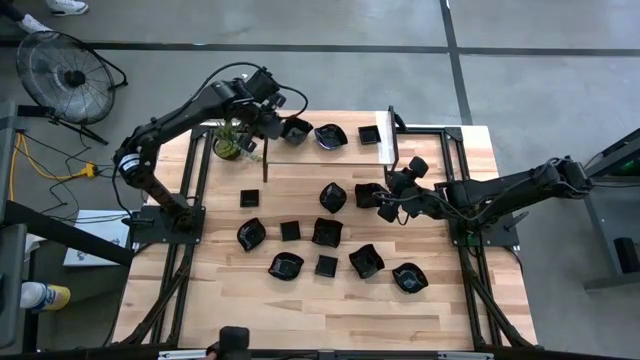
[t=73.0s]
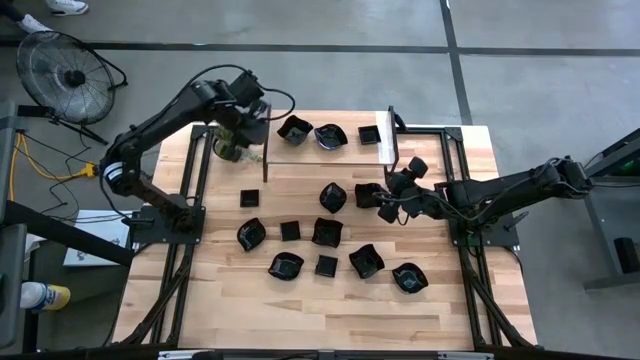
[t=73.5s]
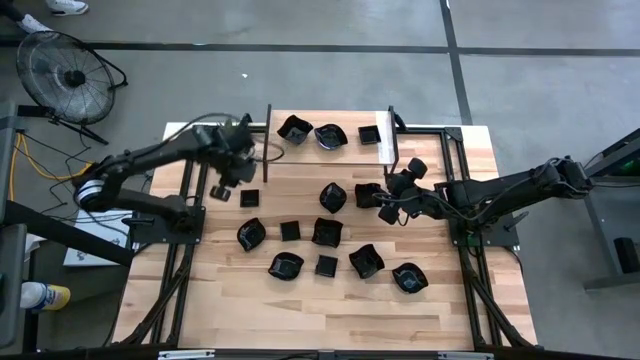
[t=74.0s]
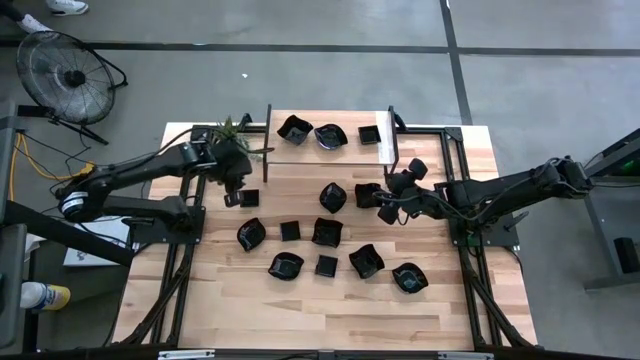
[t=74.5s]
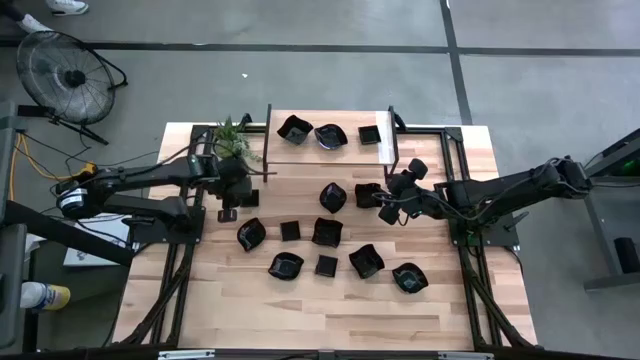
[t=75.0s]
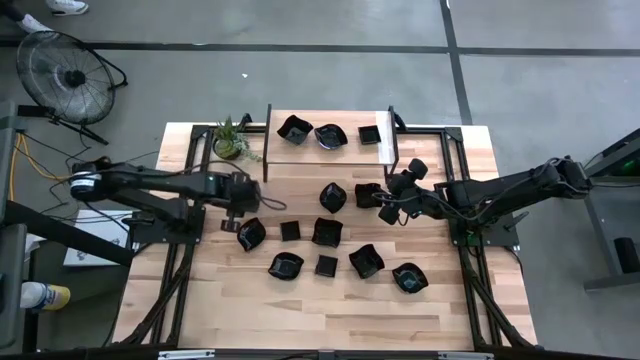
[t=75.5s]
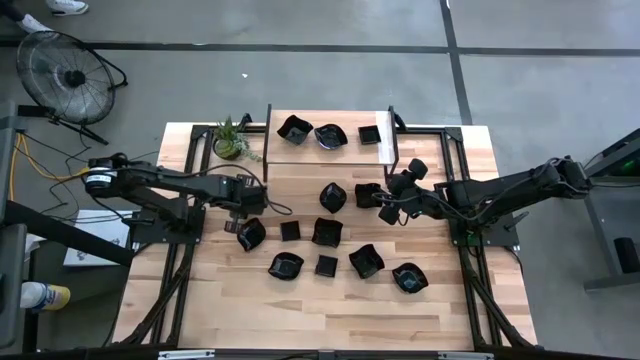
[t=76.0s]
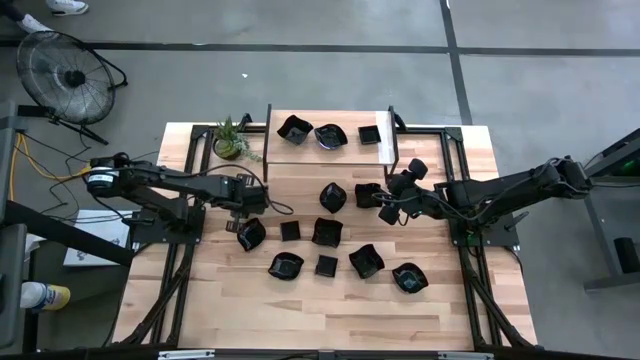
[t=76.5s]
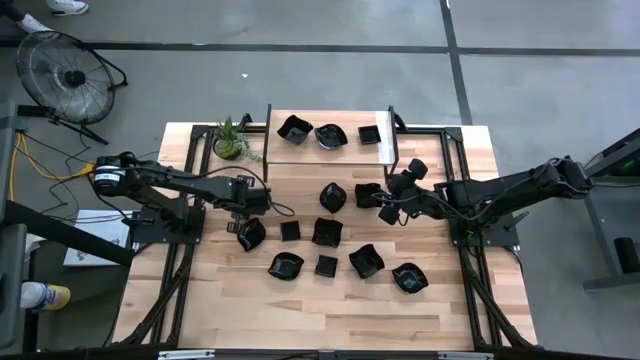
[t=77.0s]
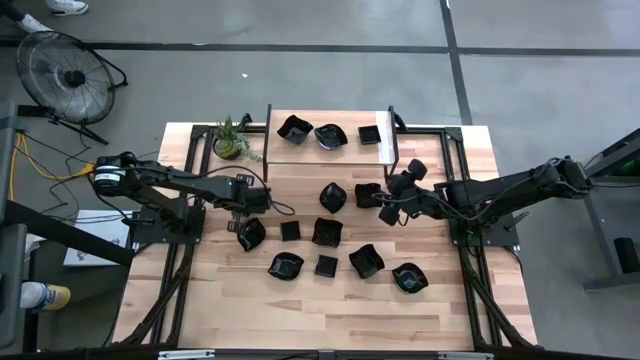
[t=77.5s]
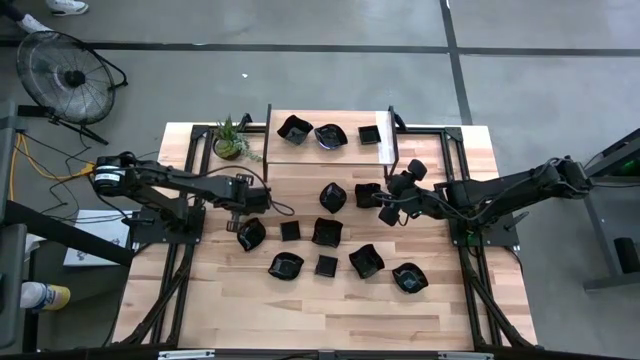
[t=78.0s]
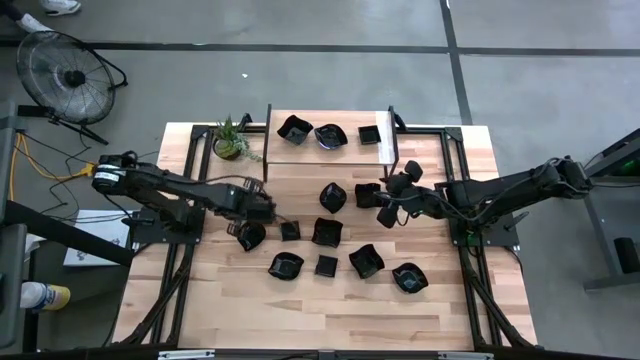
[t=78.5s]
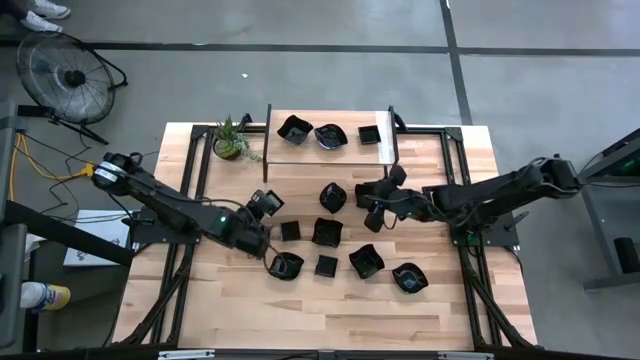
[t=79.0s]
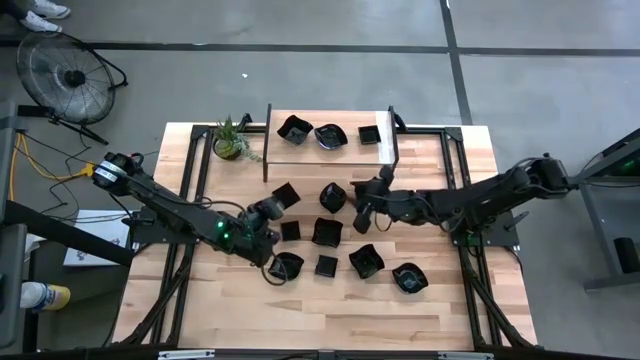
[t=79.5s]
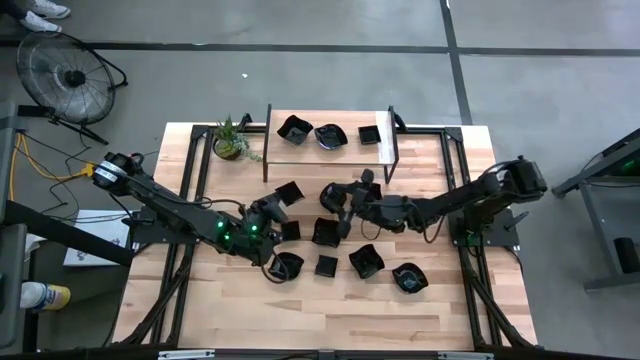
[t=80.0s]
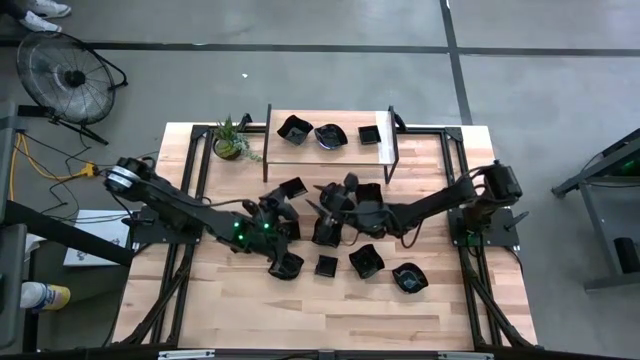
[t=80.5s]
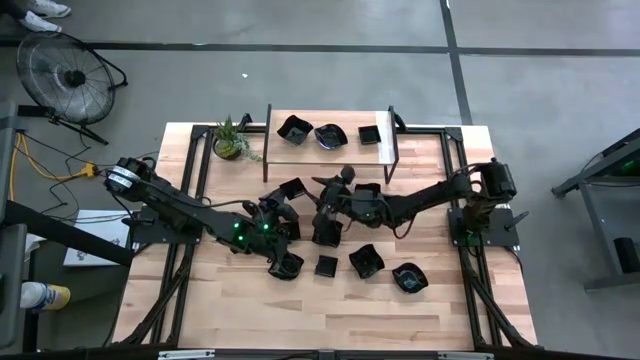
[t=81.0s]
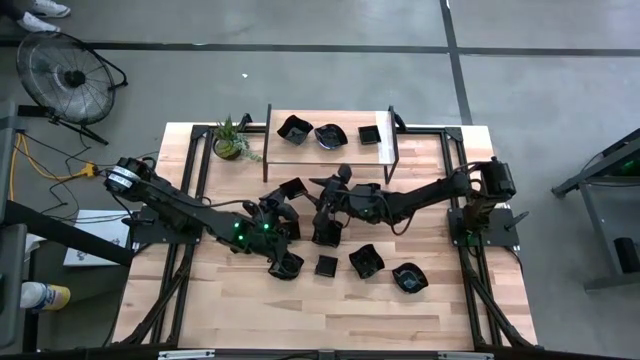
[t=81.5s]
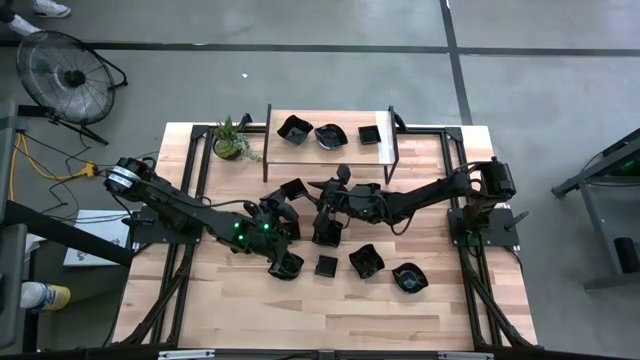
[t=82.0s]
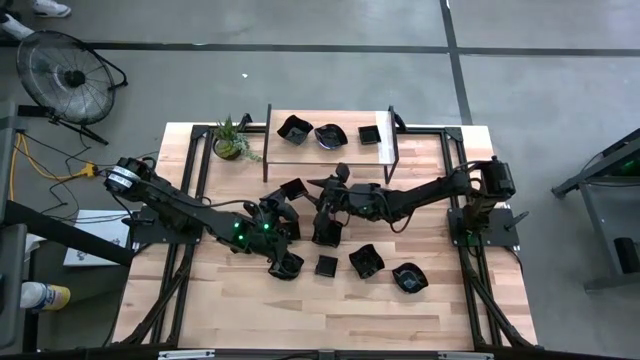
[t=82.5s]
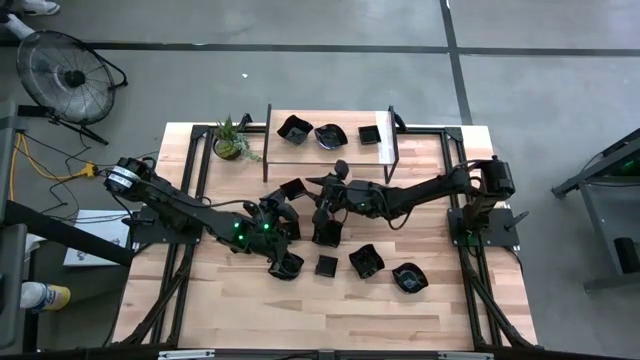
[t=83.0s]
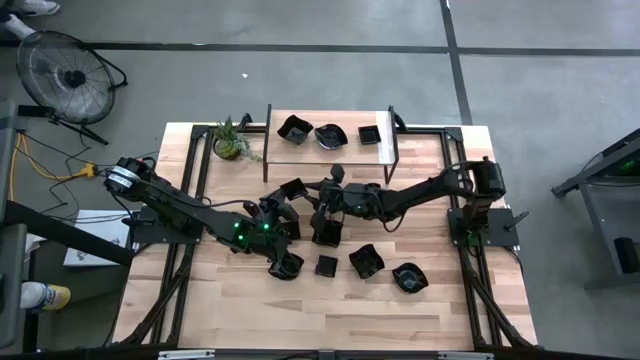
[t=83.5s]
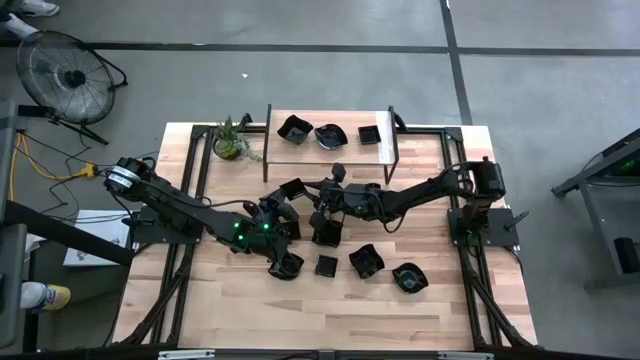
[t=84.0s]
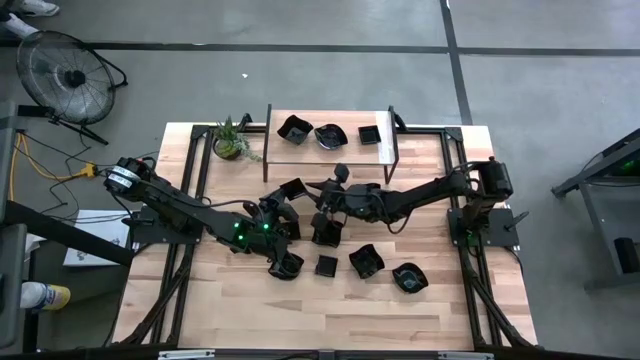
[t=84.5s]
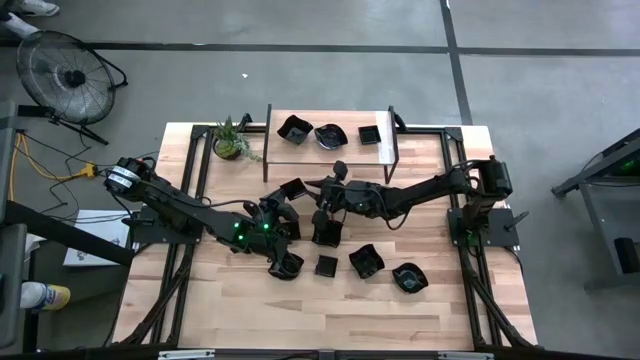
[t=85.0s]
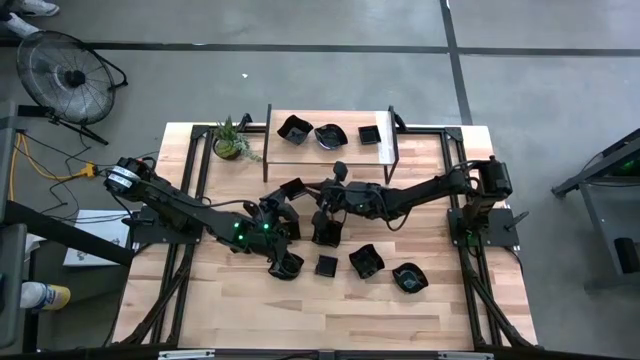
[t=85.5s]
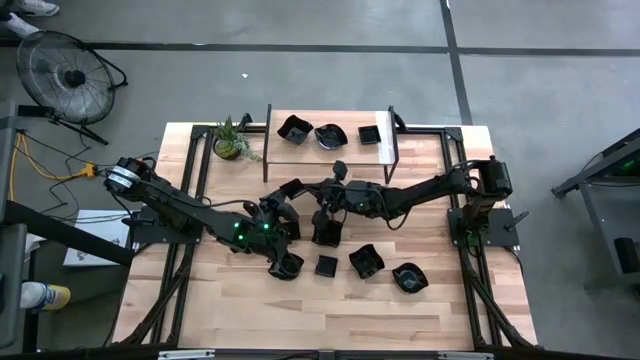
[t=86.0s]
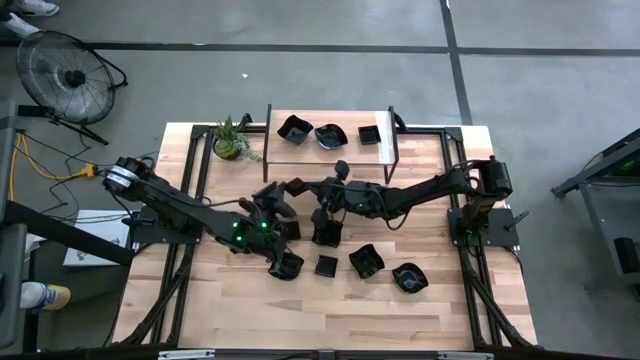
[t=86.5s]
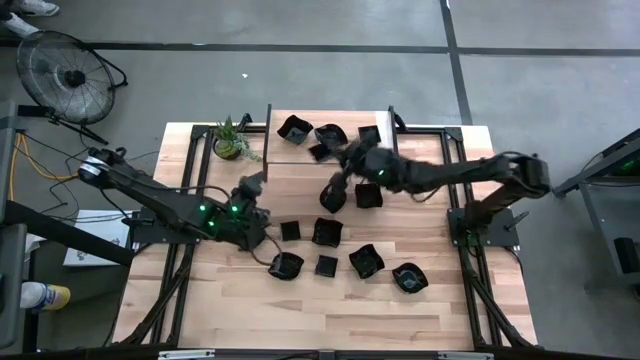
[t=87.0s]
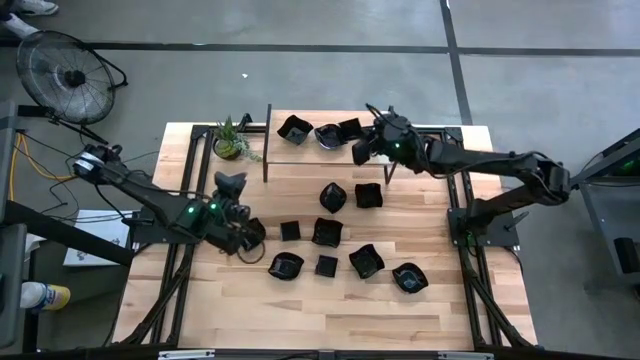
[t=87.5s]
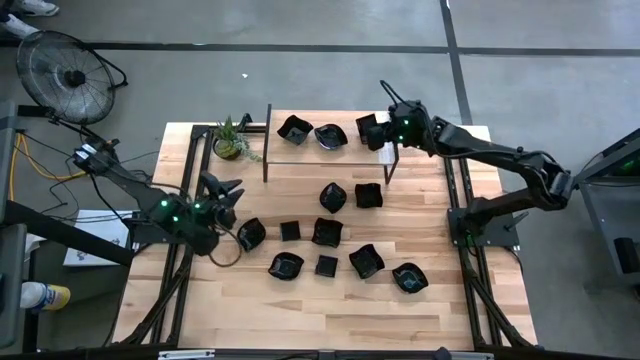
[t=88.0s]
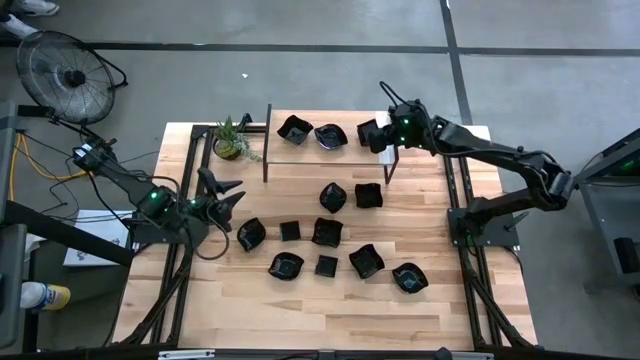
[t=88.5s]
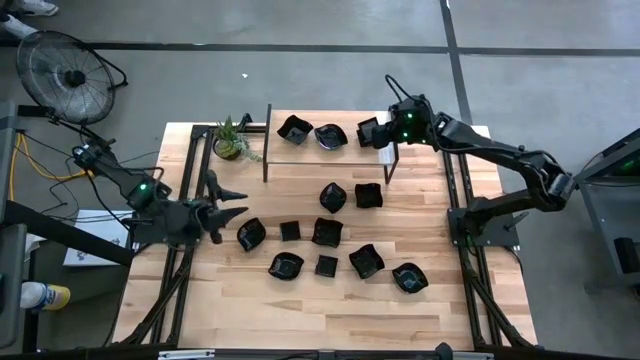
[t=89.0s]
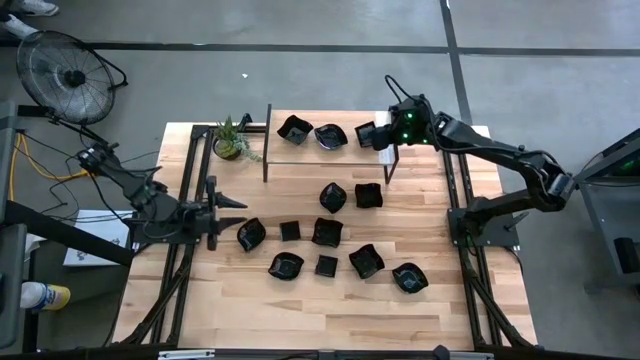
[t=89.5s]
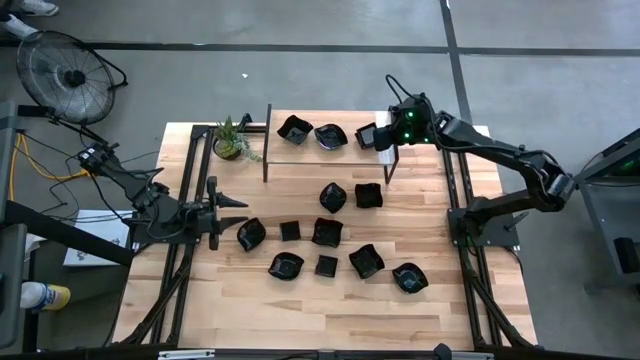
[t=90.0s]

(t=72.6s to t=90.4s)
Task: Pick & Place Mini shaped plates
Stack the black square plate on top of the black square plate on the shelf

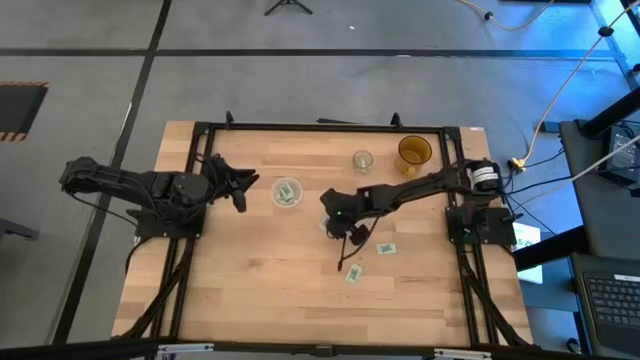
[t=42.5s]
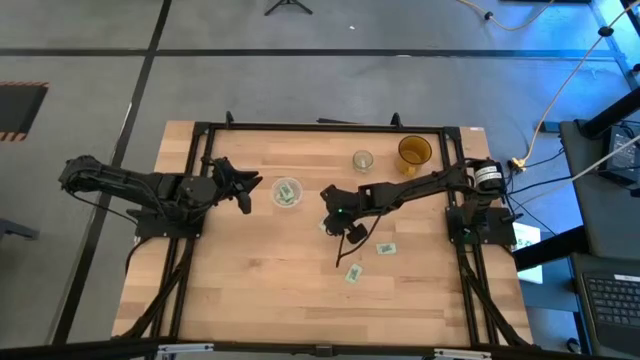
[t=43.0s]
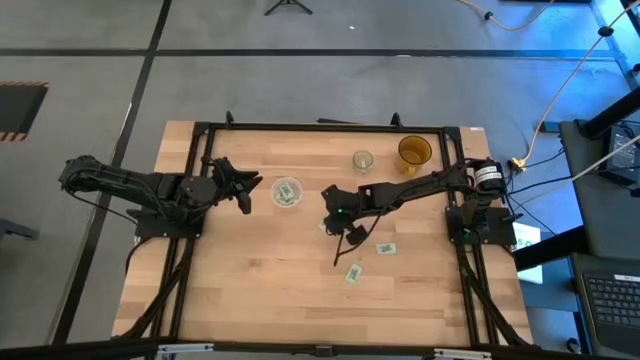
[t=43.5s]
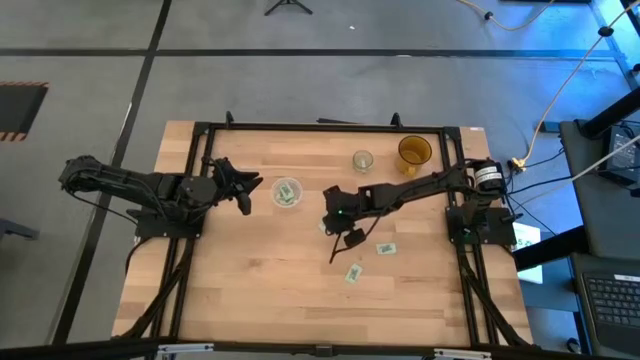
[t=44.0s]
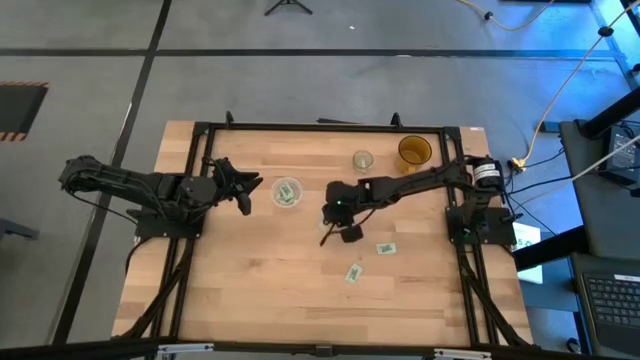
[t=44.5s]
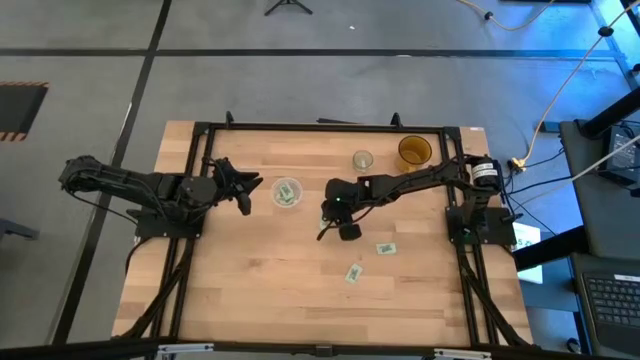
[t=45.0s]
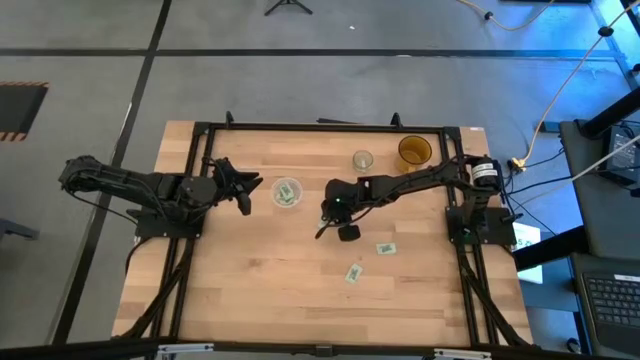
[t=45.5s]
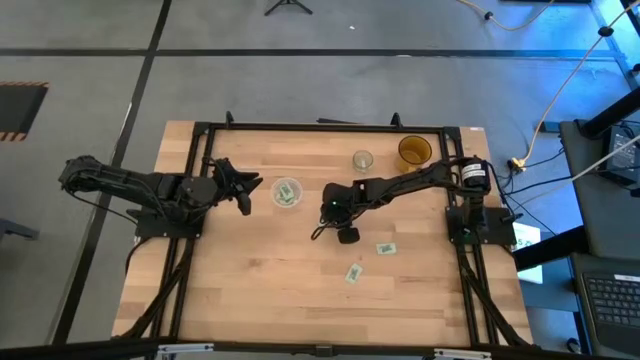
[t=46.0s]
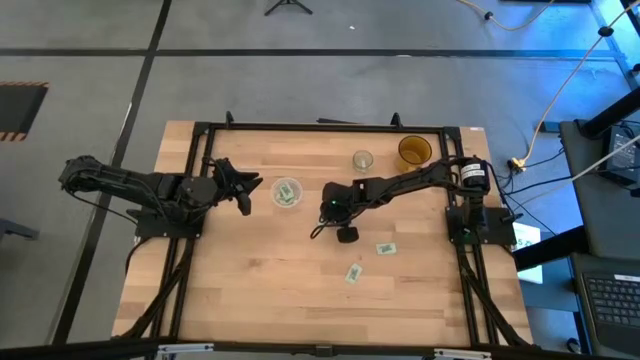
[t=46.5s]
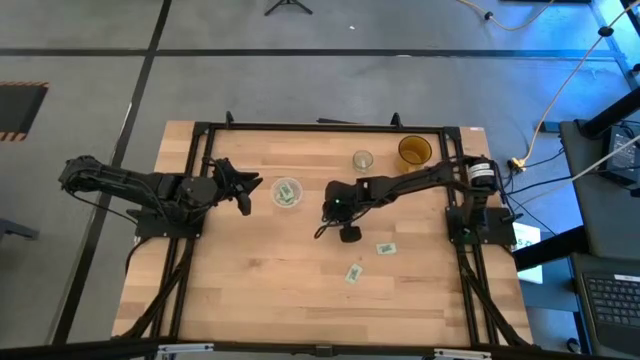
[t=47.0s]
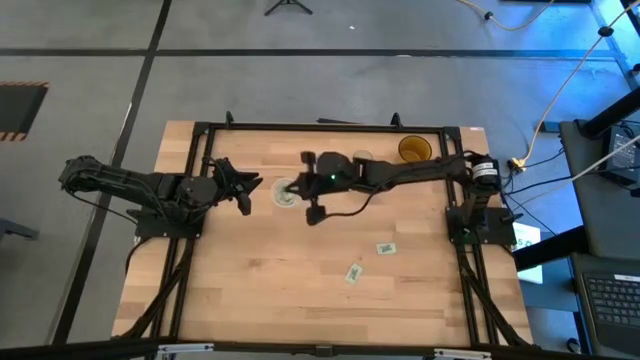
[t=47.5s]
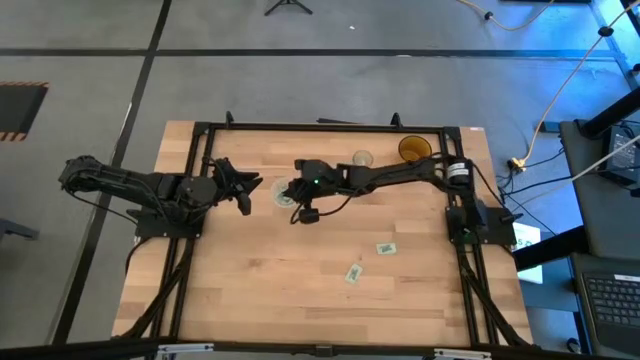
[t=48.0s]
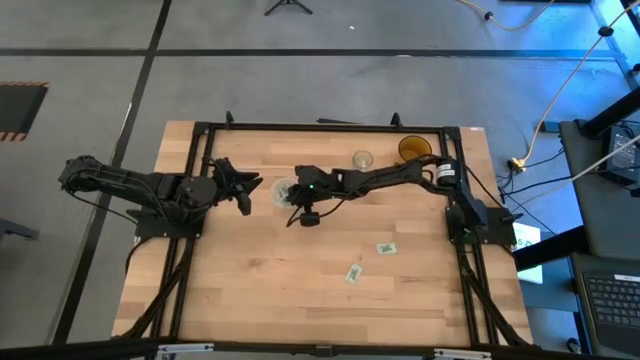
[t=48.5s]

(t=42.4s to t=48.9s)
Task: Pick and place Stevia / Truvia into bins
Put the stevia packet into the transparent container
